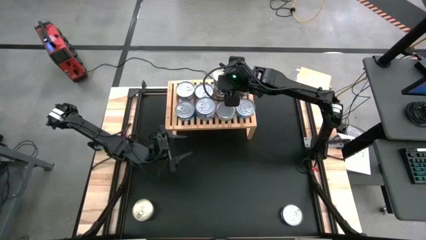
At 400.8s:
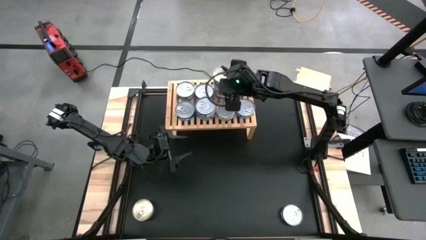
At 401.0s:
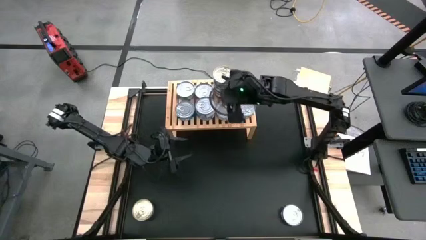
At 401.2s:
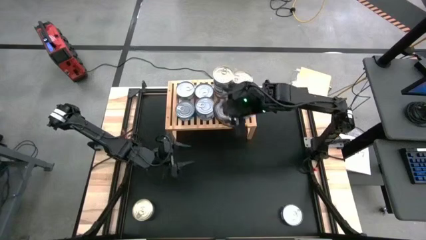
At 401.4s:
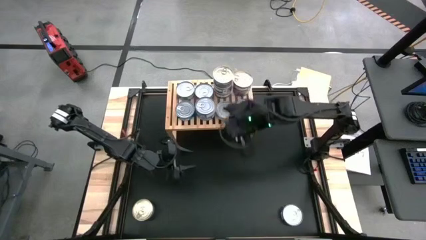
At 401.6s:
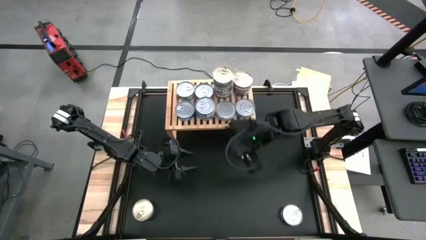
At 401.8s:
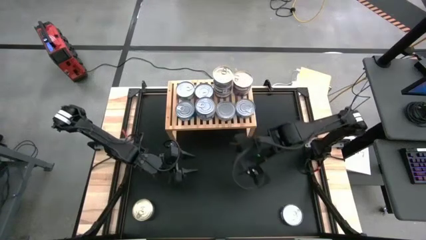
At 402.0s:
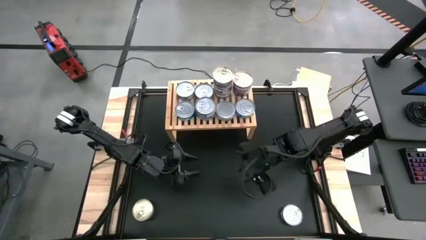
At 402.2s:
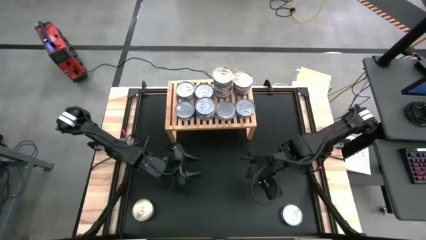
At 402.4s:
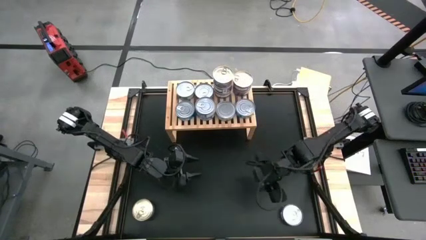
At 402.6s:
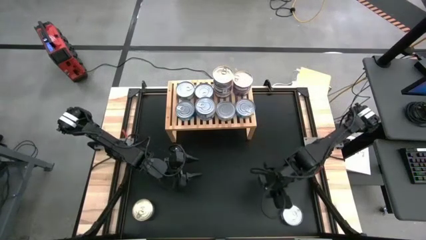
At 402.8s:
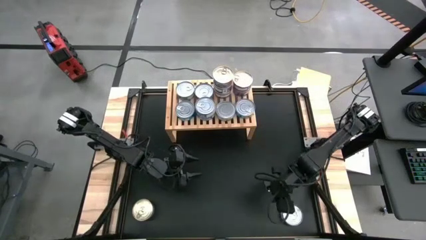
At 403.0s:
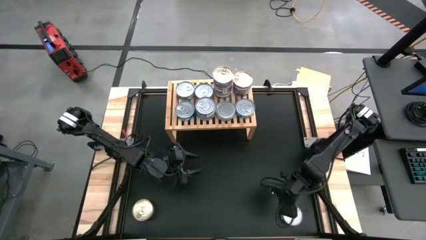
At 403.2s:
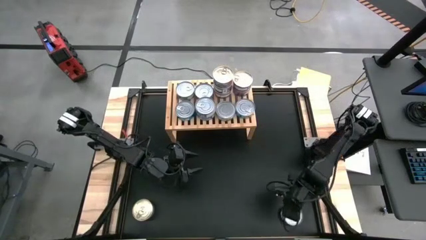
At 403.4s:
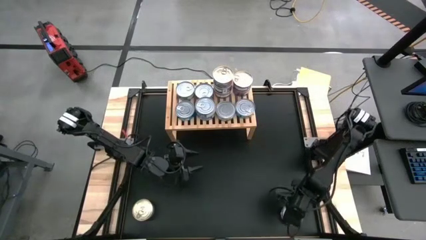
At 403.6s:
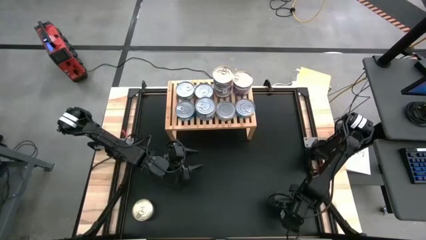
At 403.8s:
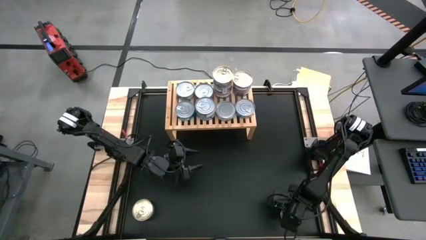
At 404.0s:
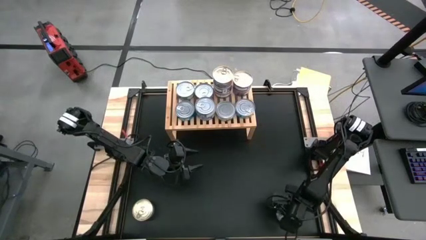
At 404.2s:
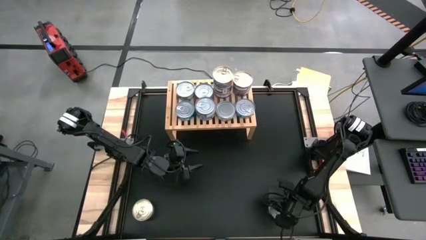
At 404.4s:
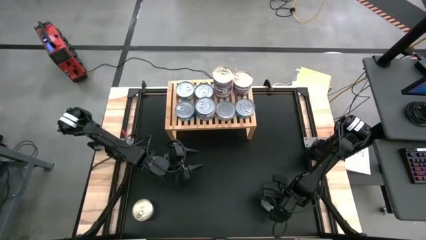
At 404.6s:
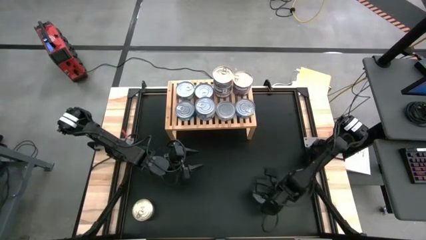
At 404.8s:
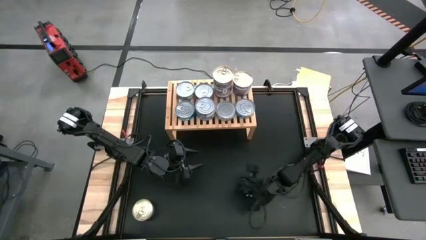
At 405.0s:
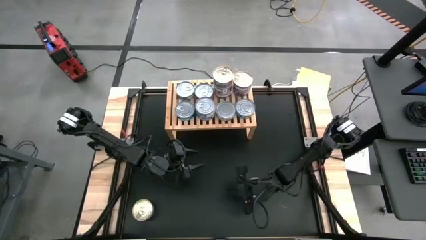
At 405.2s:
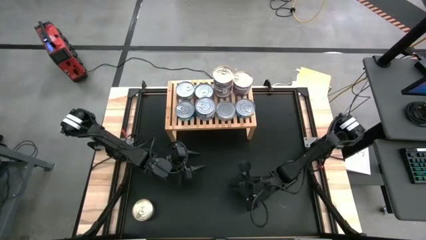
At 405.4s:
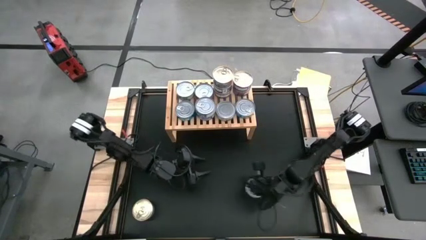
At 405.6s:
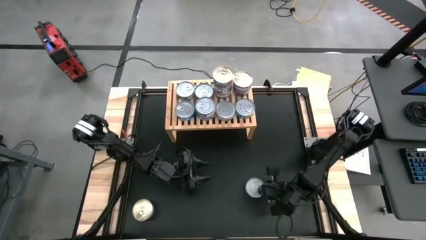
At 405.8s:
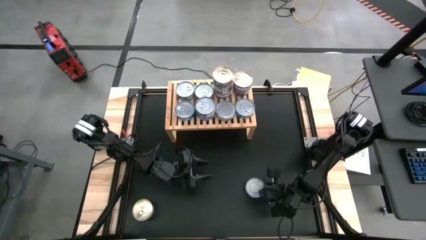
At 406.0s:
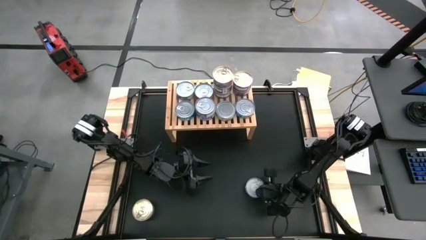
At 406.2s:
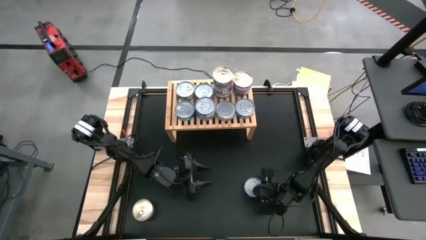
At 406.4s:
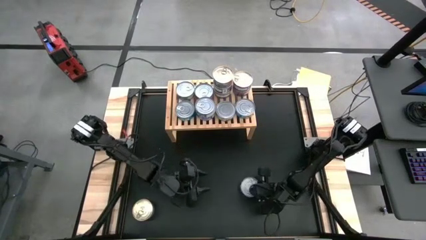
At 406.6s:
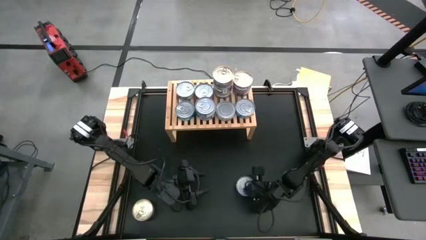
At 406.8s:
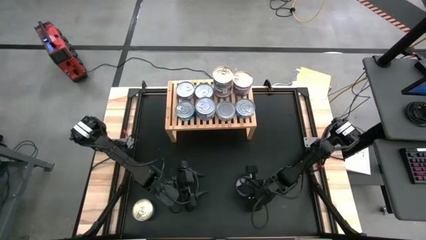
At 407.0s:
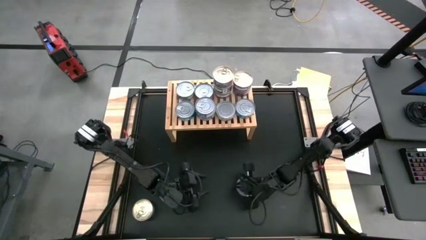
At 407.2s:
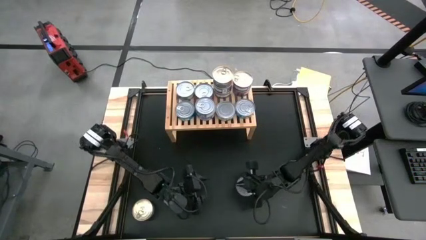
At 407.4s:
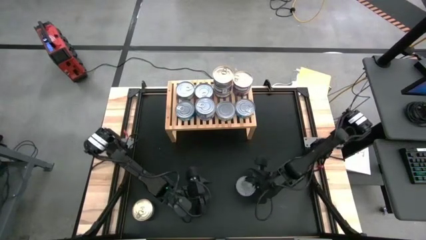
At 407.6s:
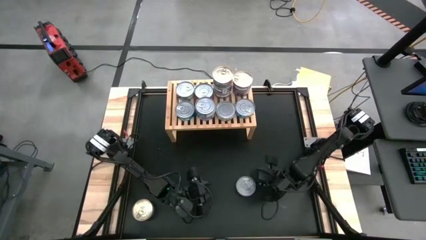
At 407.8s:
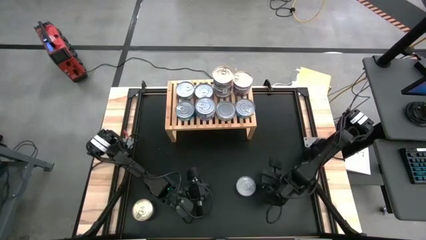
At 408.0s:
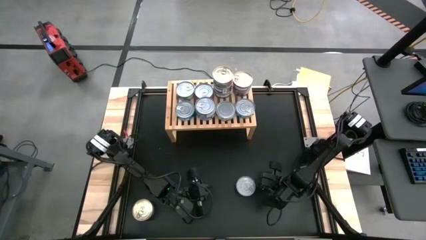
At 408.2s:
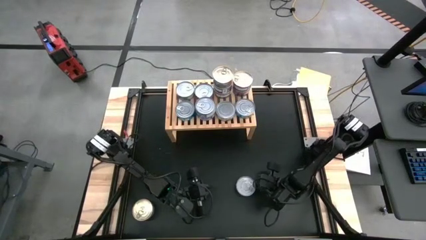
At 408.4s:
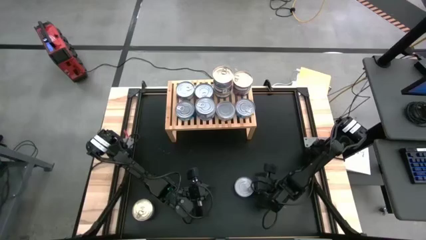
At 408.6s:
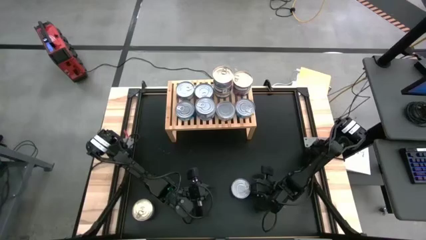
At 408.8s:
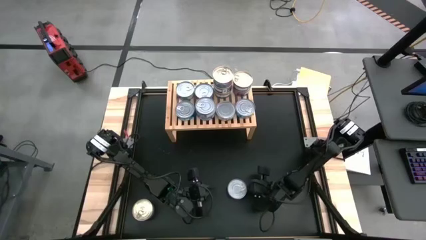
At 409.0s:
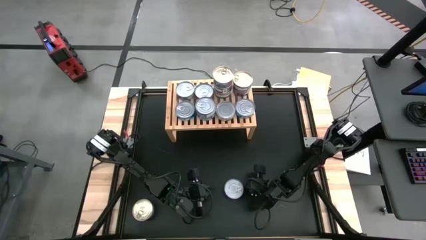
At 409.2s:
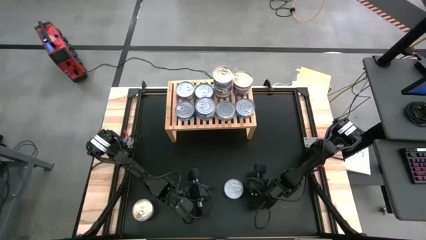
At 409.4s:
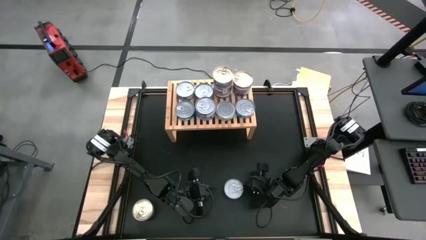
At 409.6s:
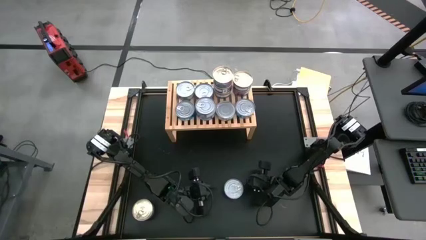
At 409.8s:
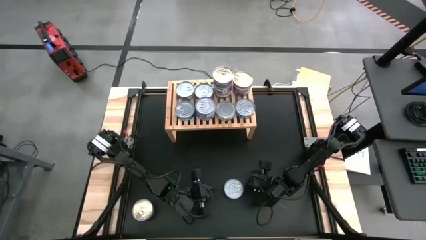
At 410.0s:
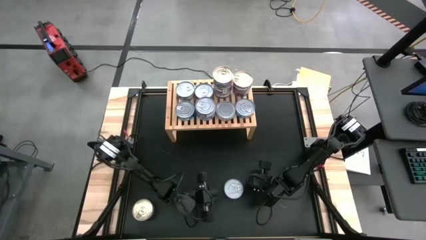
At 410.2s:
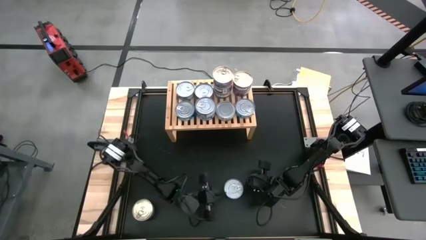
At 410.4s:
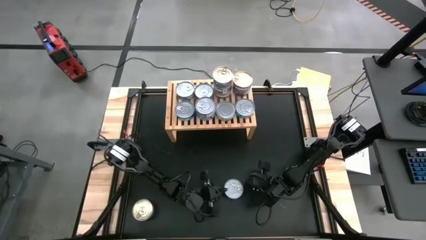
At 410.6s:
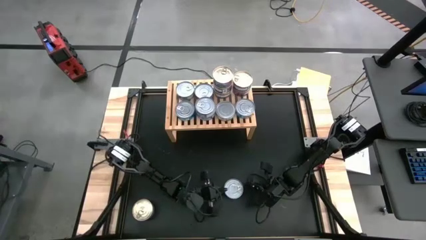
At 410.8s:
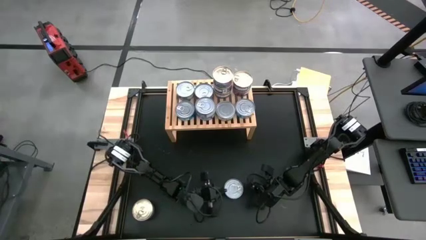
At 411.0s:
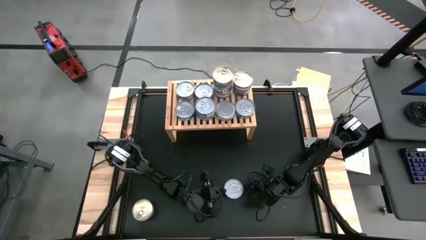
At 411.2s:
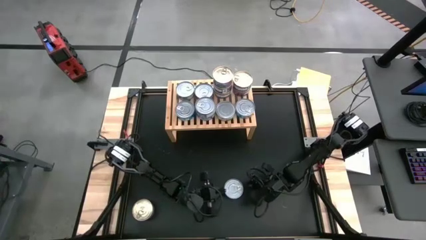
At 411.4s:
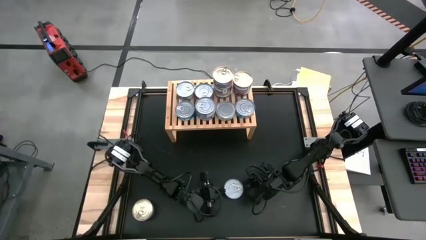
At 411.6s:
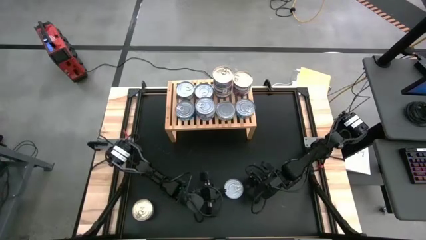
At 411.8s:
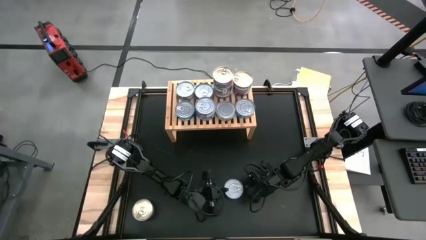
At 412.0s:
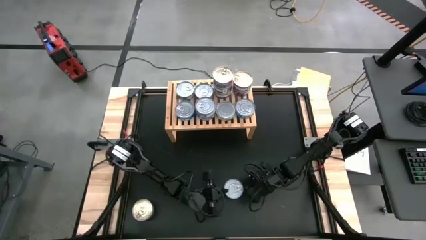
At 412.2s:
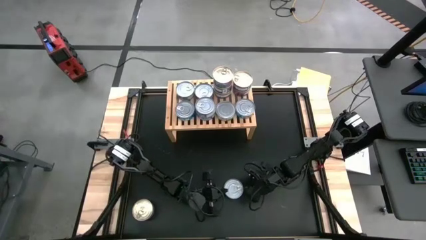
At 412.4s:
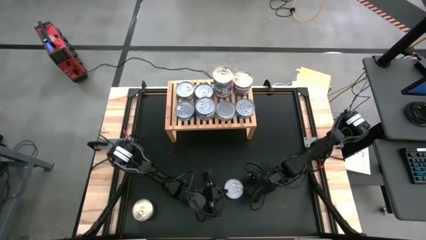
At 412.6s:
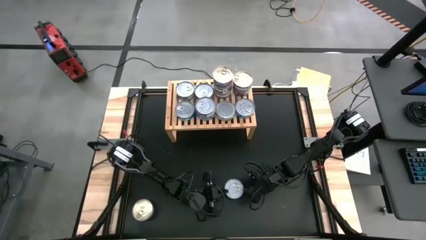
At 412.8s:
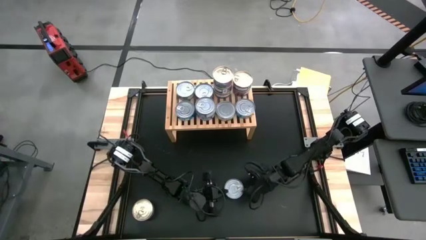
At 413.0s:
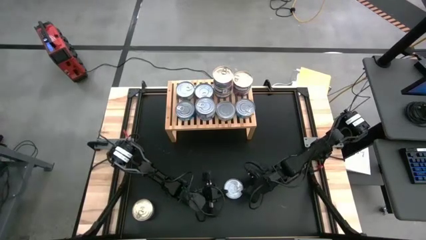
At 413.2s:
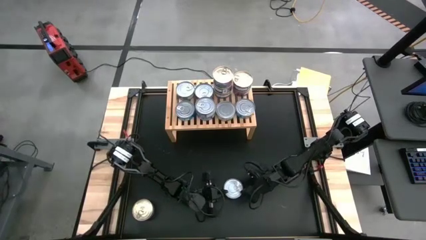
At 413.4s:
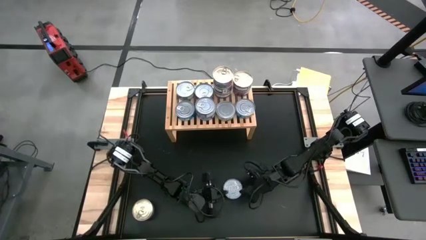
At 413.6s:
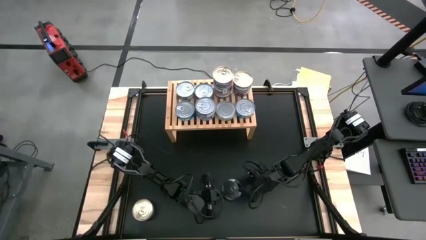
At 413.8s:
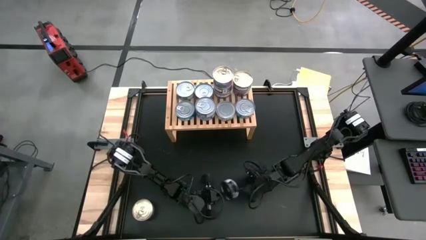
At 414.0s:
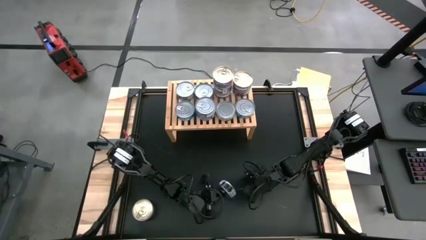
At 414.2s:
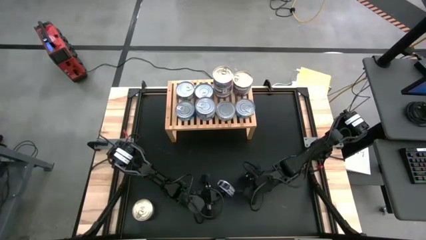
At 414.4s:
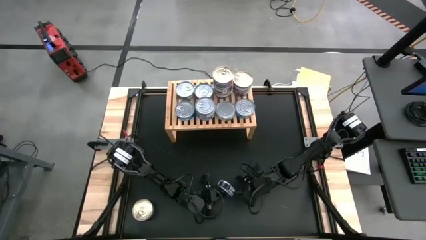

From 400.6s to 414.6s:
Task: Stack canned seafood by type on shelf
Stack the blue tuna can on top of the blue tuna can

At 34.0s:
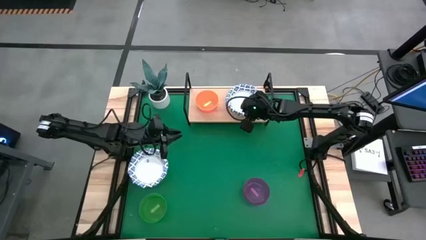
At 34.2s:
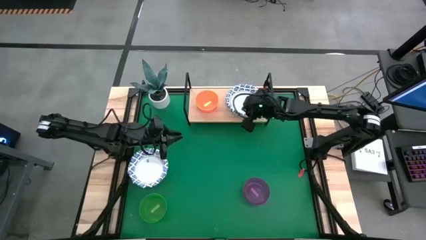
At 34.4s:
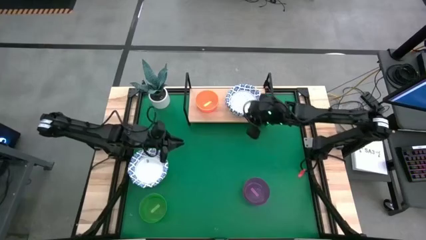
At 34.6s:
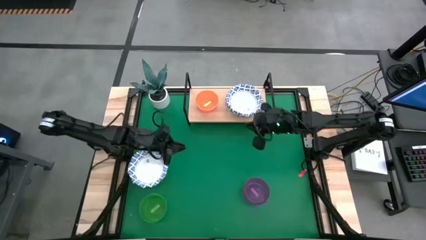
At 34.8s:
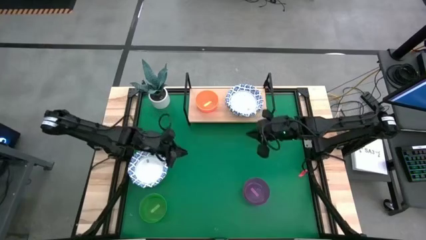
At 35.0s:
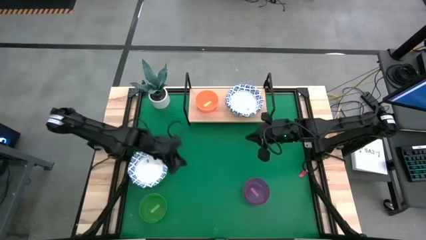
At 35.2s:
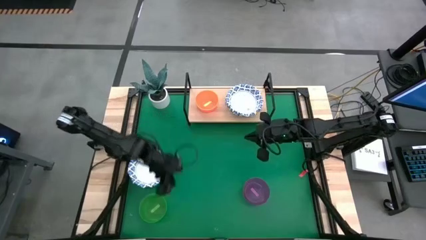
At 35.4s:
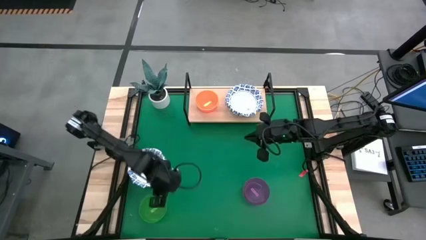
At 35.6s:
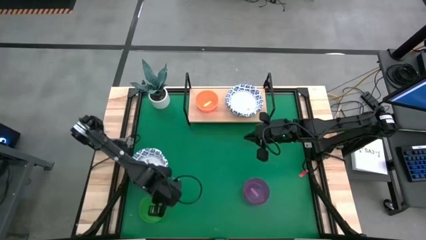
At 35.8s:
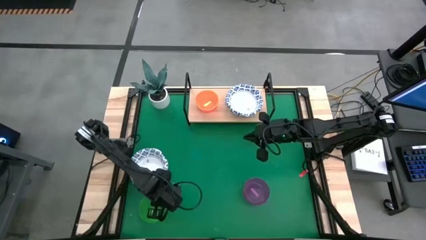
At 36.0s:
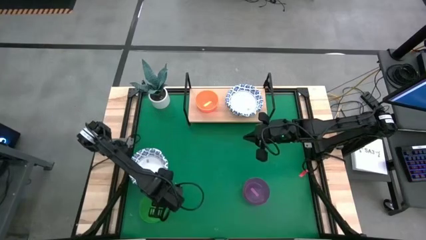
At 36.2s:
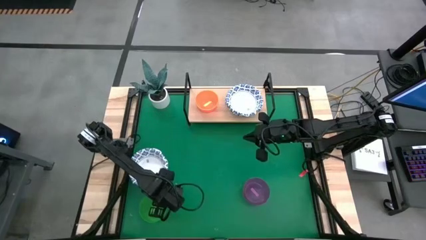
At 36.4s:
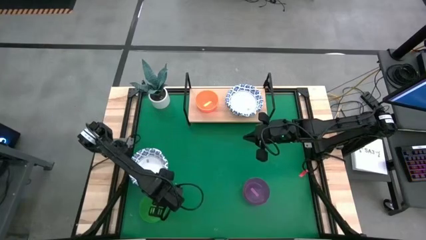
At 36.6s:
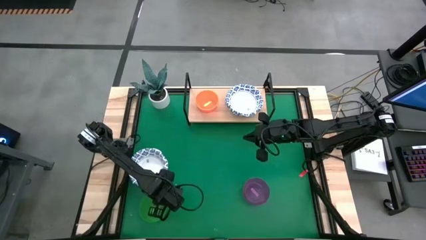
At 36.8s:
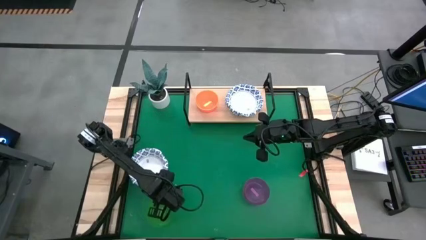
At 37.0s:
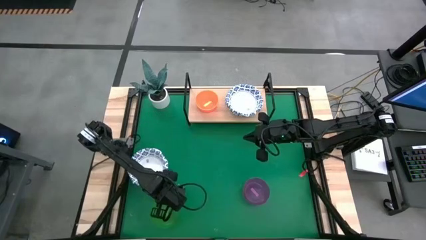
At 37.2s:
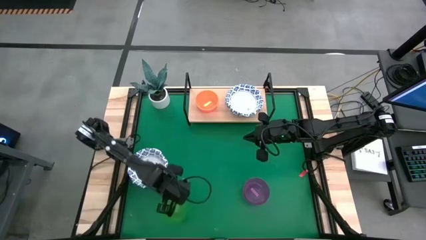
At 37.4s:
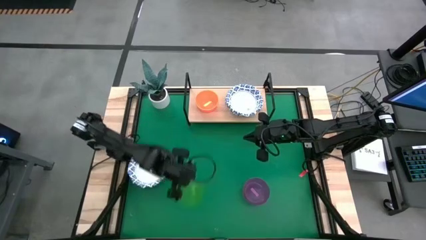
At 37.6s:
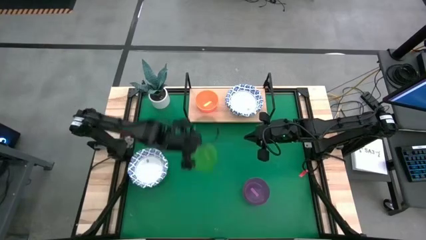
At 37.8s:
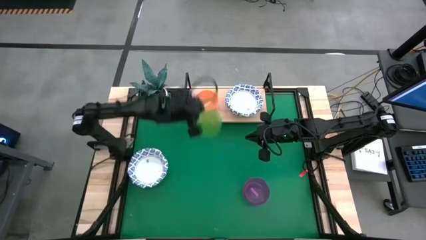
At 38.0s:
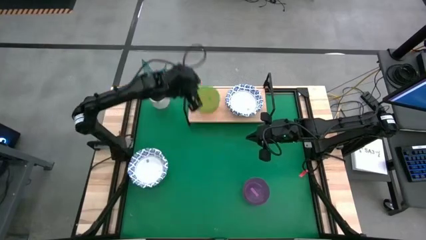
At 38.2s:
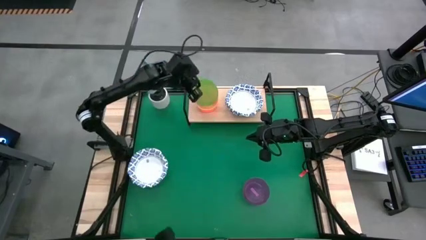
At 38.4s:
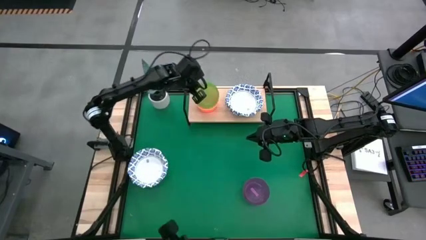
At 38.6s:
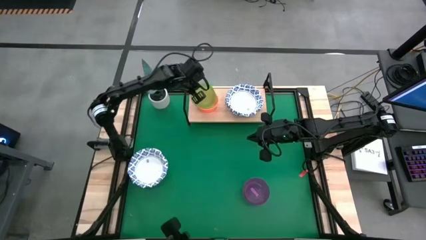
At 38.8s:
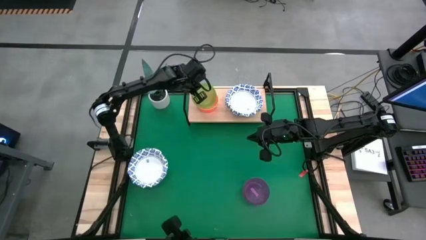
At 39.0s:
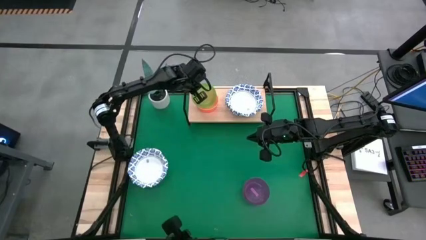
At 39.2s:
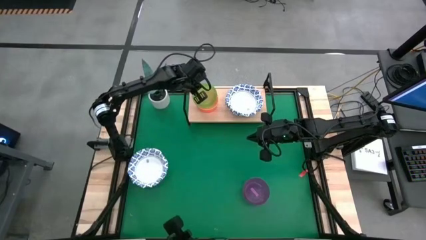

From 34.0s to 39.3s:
Task: Place and stack bowls onto a shelf
Stack the green bowl on top of the yellow bowl on the shelf
